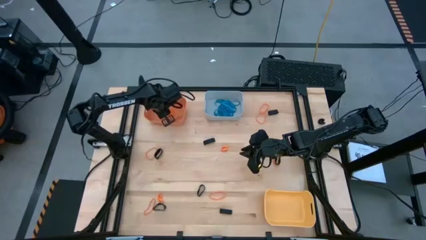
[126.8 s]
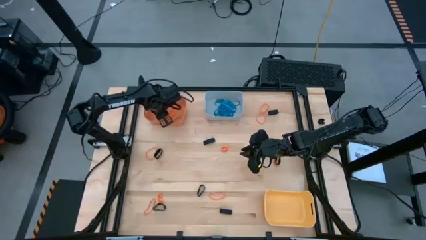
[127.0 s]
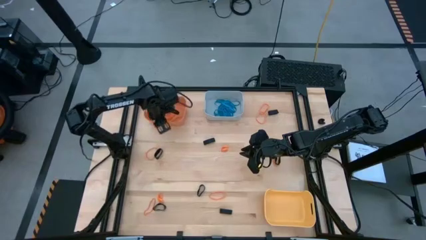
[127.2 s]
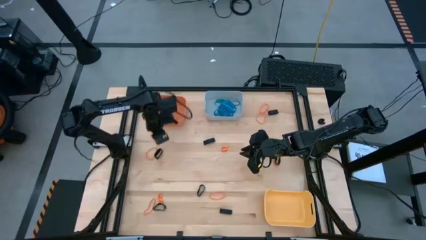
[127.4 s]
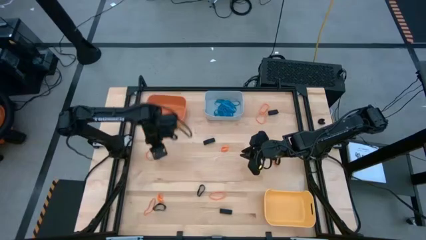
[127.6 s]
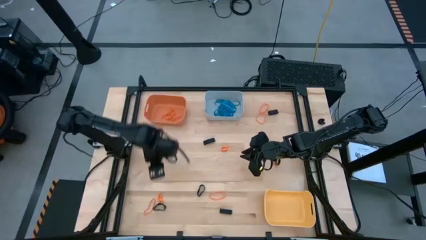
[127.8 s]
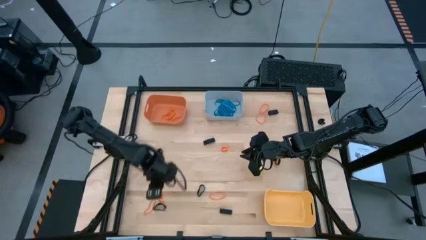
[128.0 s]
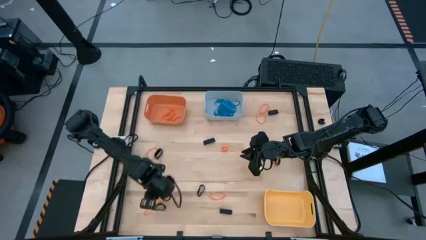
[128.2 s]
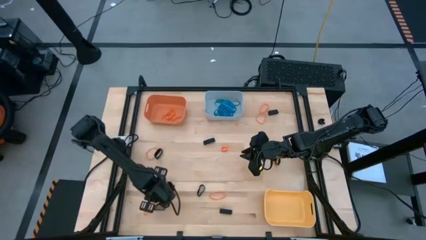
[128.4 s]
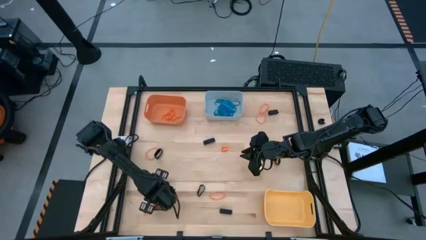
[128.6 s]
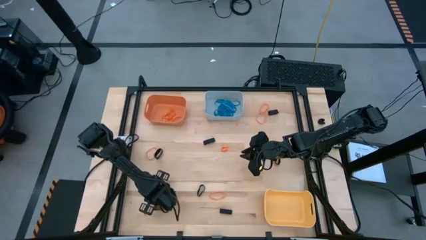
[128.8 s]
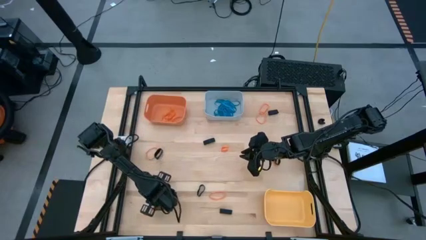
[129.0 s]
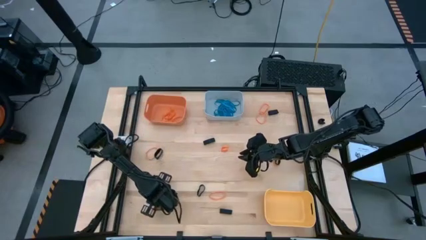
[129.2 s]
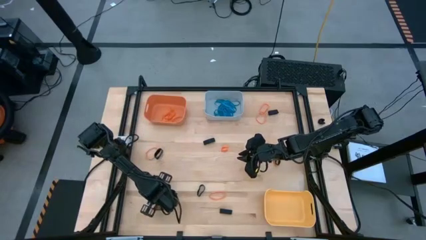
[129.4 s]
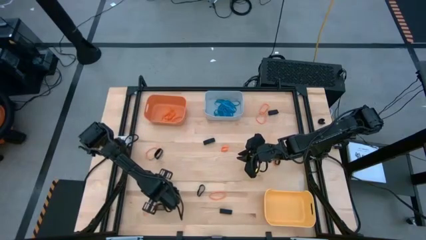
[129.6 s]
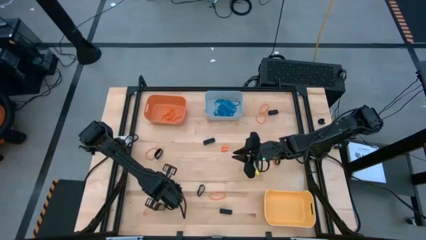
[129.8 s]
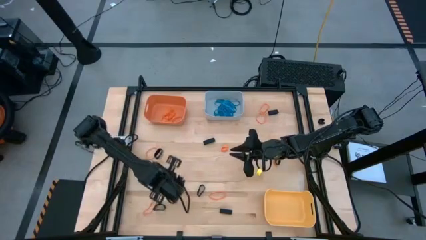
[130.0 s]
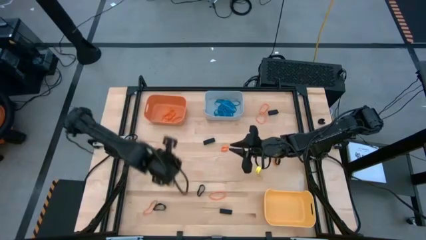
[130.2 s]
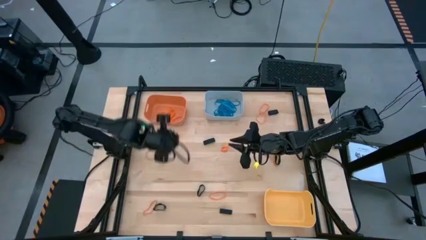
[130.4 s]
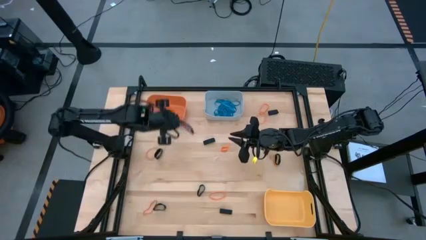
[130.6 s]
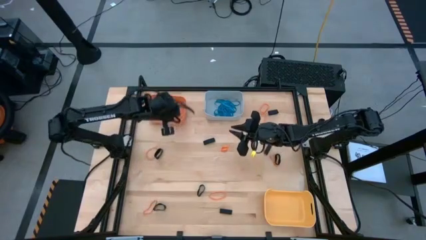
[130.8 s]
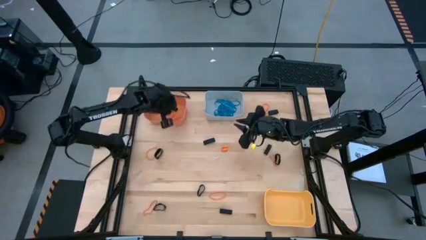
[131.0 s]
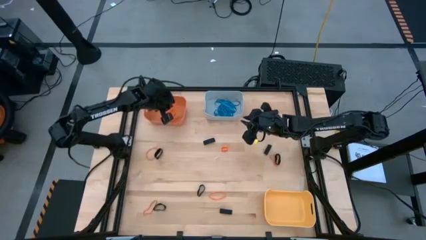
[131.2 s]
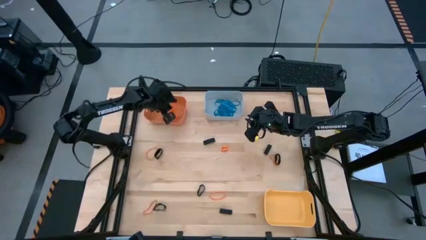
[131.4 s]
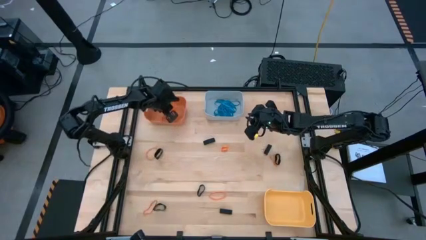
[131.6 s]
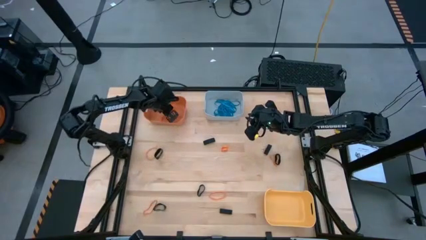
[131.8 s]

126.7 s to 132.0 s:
Task: Sort rubber bands into baskets
Put the orange rubberband into the orange bin

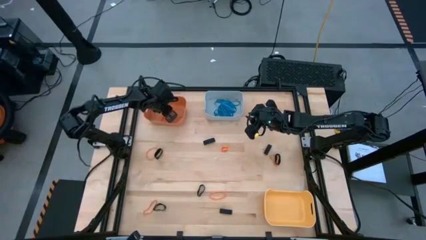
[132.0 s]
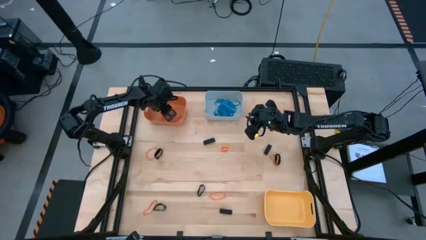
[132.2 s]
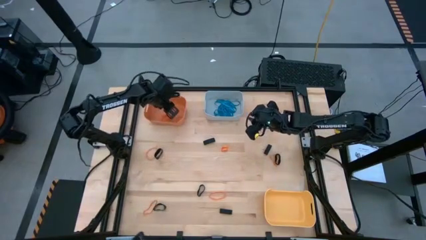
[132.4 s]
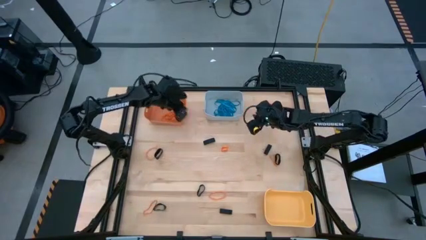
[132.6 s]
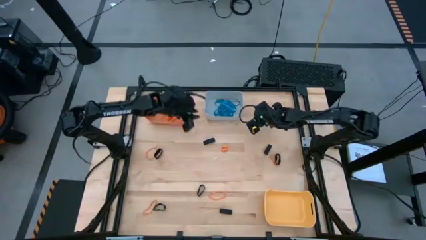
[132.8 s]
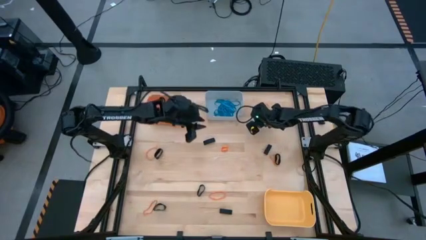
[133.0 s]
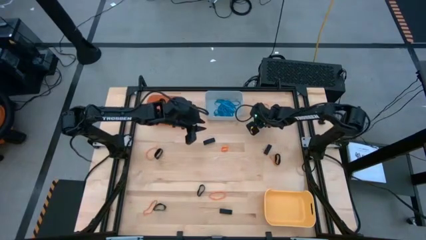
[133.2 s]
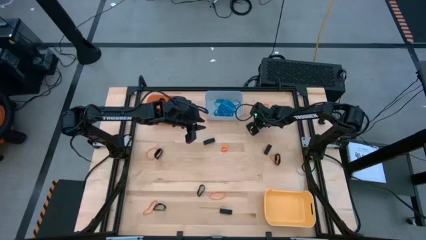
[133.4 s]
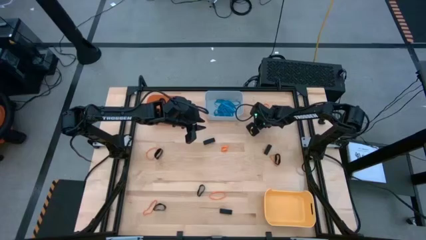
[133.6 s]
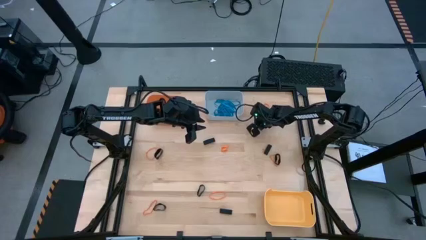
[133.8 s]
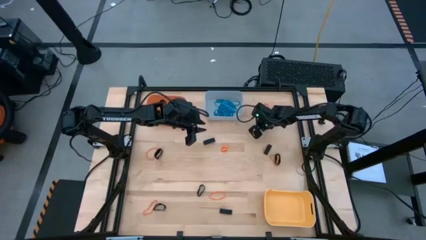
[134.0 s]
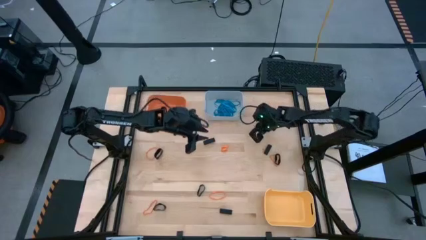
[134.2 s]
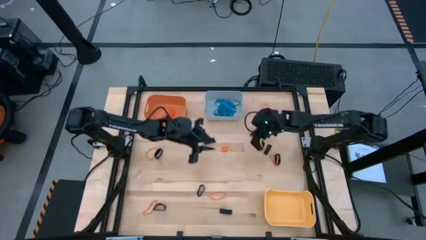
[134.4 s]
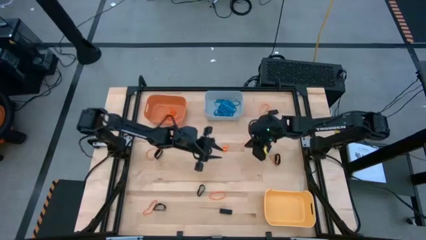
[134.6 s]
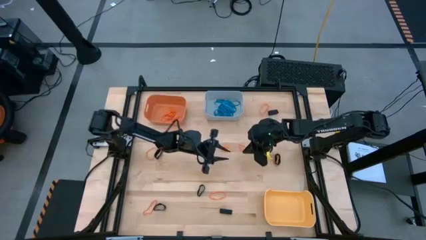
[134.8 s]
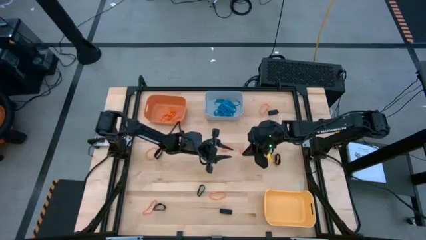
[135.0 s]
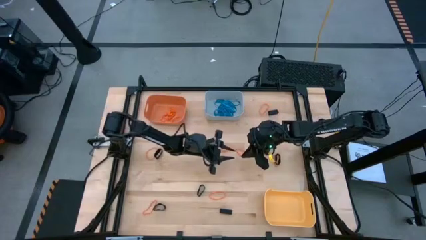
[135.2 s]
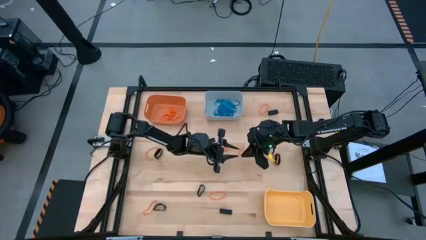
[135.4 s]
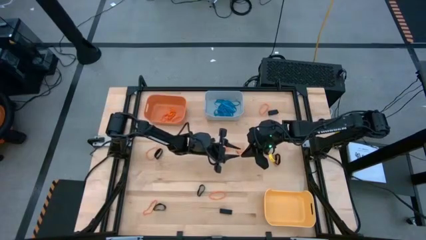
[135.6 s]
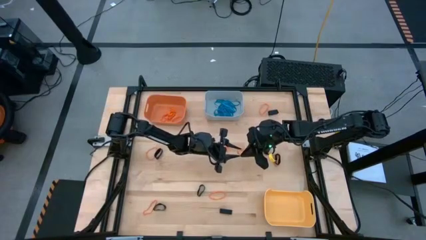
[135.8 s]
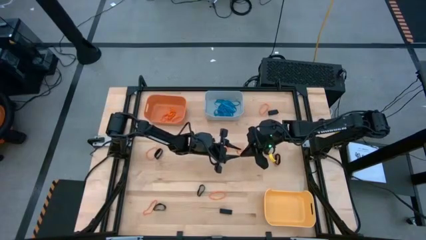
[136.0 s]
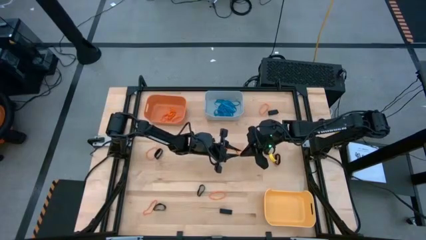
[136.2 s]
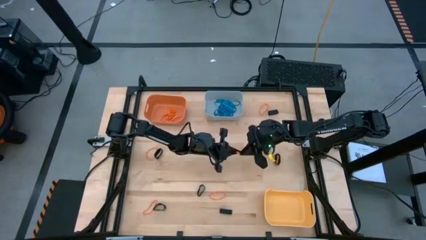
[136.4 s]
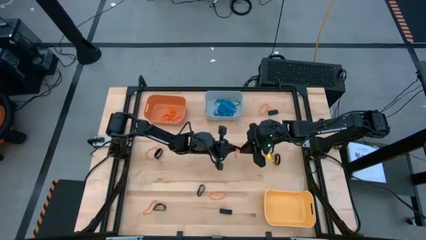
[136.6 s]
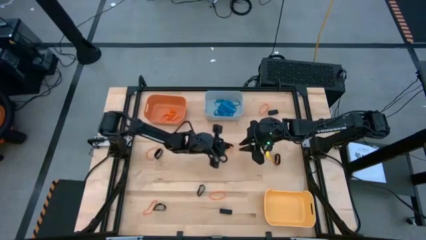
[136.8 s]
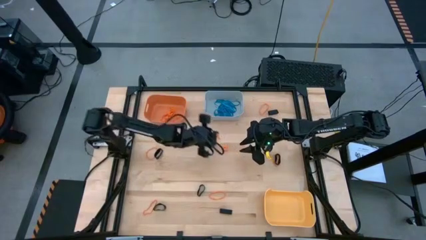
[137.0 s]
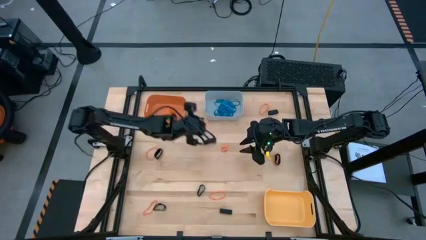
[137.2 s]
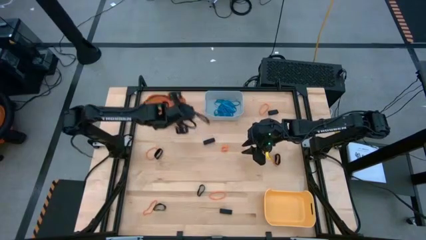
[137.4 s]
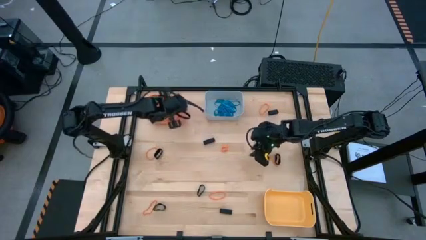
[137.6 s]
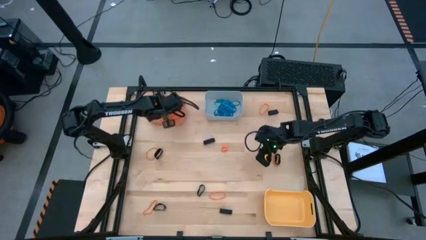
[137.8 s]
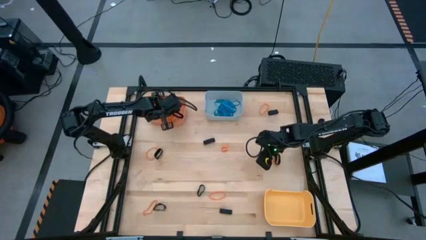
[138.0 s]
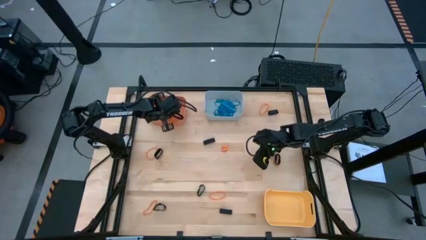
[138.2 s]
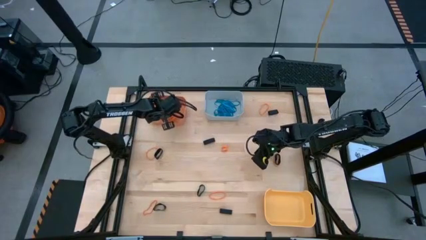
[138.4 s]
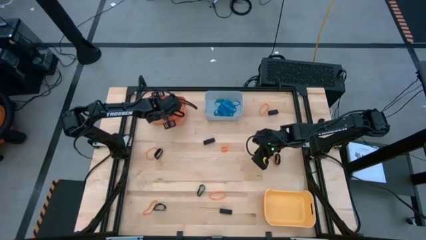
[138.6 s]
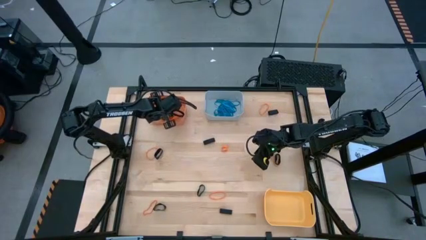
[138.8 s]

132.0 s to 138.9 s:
Put the orange rubberband into the orange bin

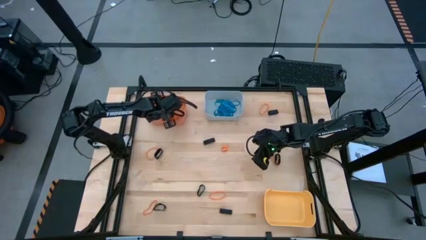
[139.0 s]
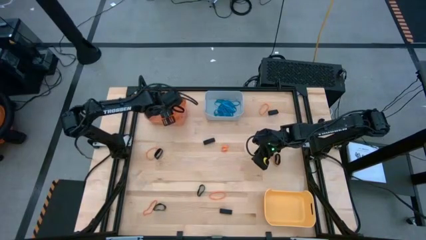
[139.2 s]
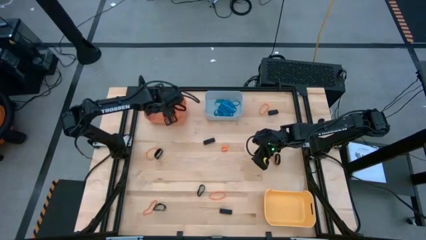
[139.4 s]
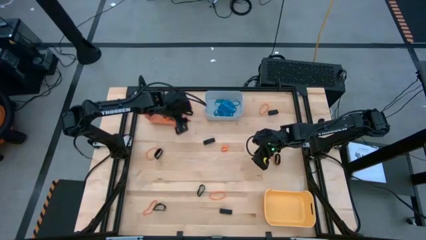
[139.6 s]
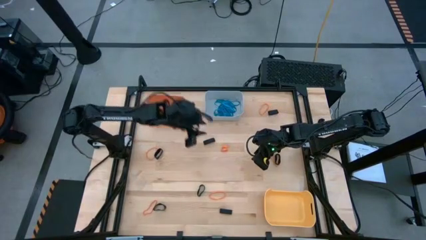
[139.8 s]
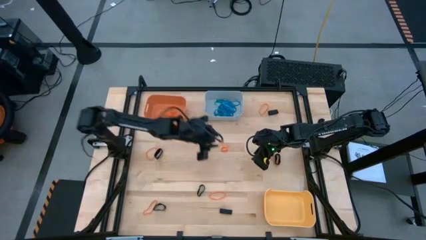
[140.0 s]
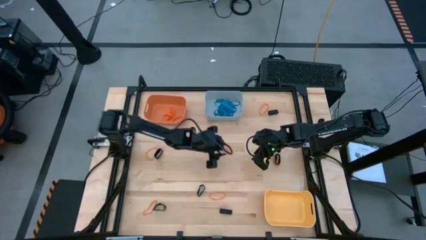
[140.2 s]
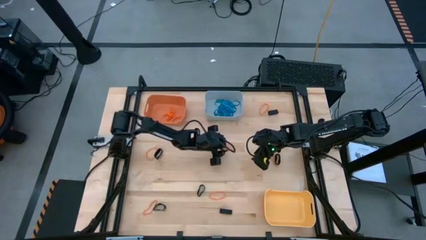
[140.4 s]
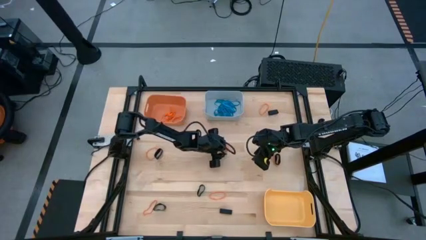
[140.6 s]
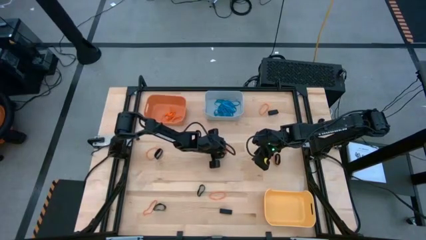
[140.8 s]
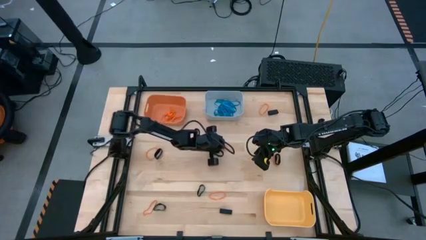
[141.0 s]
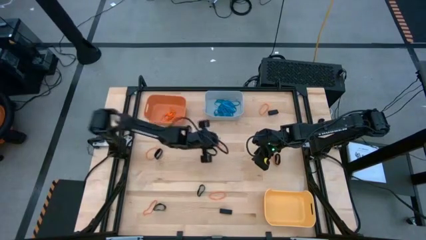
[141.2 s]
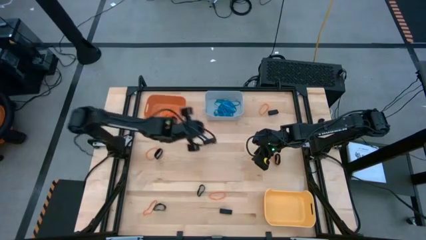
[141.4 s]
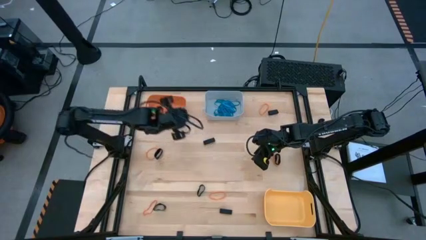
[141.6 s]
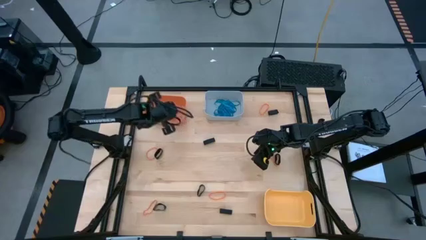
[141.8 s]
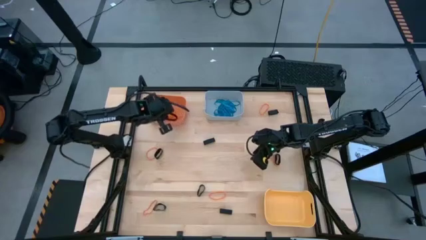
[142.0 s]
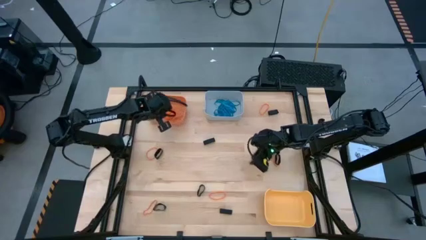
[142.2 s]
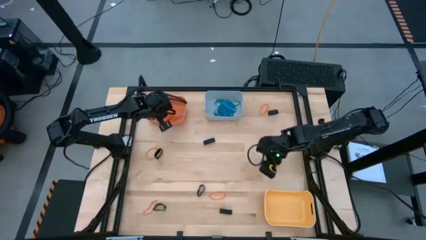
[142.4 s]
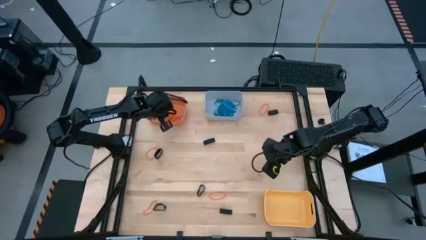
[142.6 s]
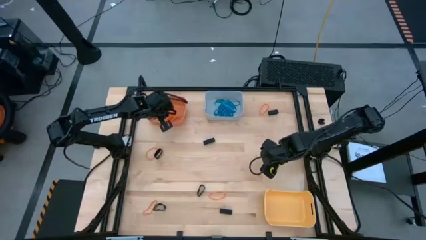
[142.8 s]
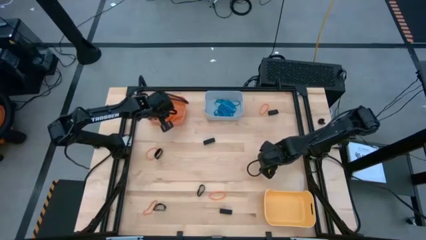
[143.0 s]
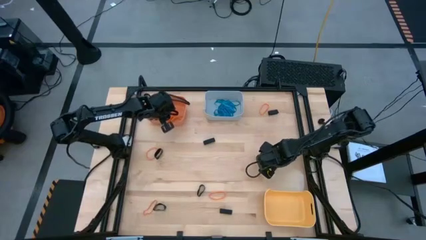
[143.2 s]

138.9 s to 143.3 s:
Put the orange rubberband into the orange bin
